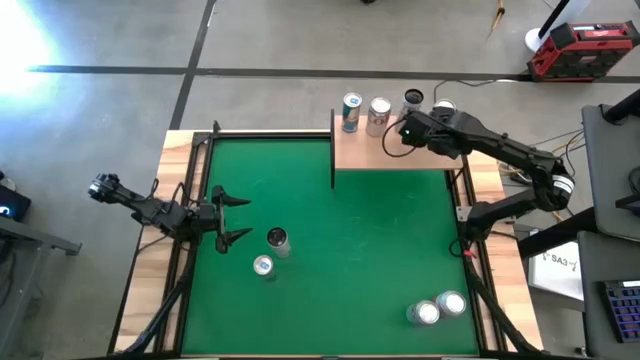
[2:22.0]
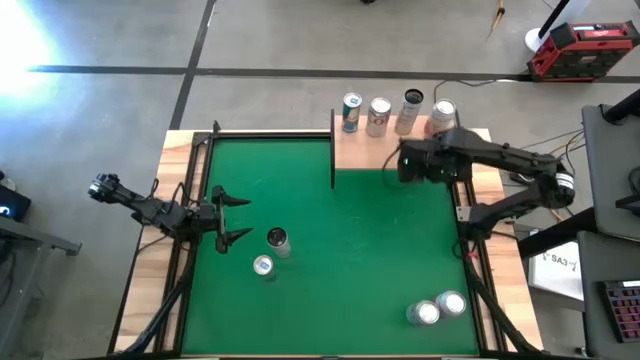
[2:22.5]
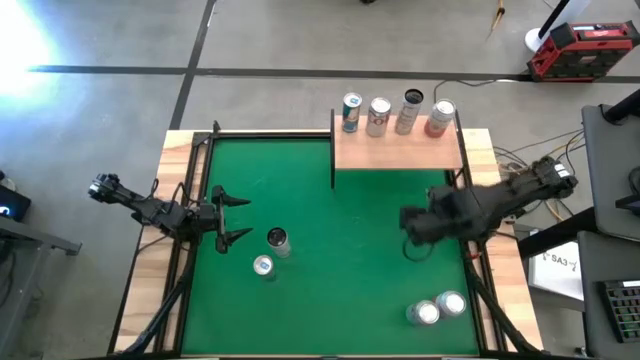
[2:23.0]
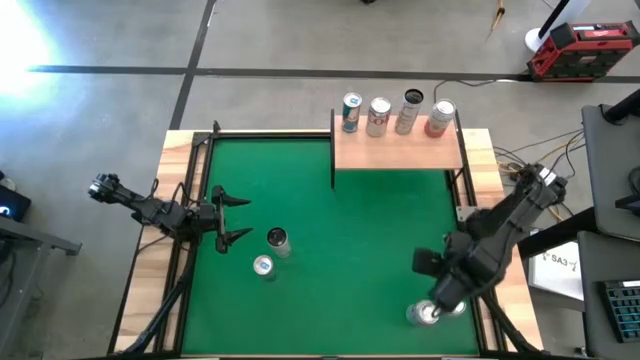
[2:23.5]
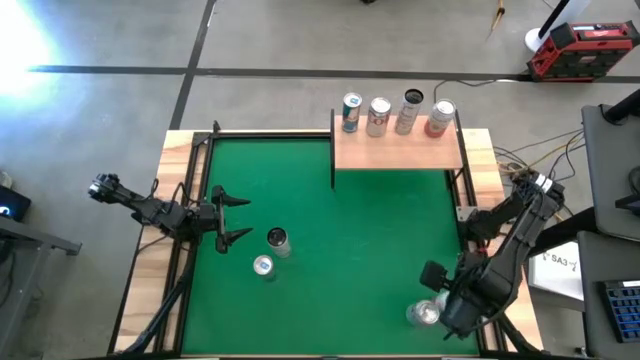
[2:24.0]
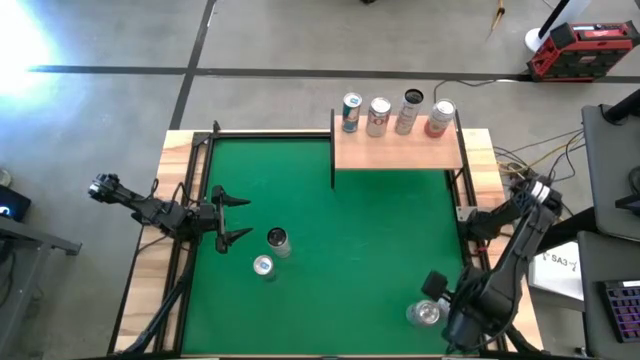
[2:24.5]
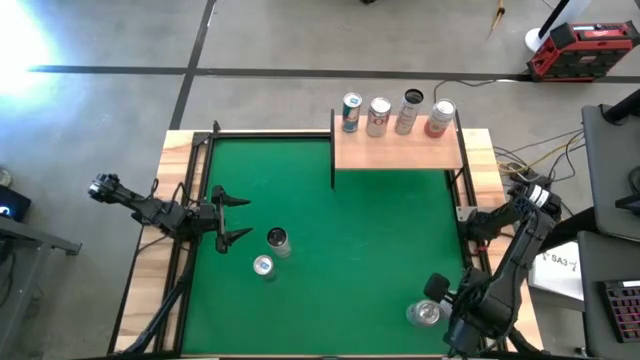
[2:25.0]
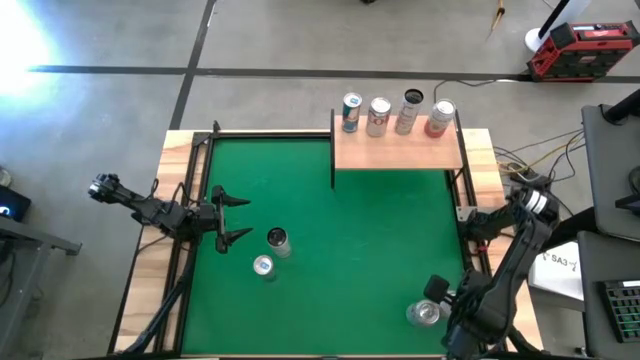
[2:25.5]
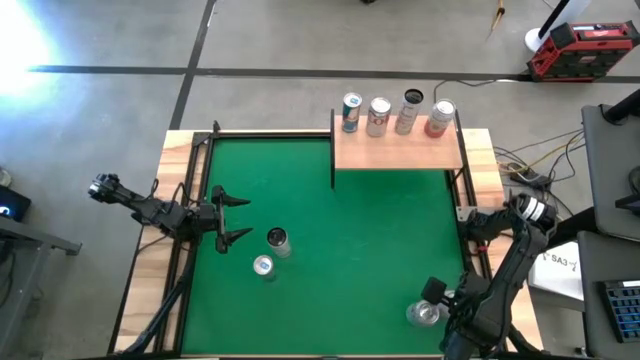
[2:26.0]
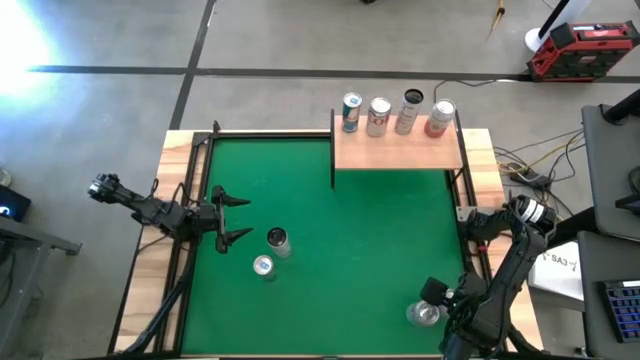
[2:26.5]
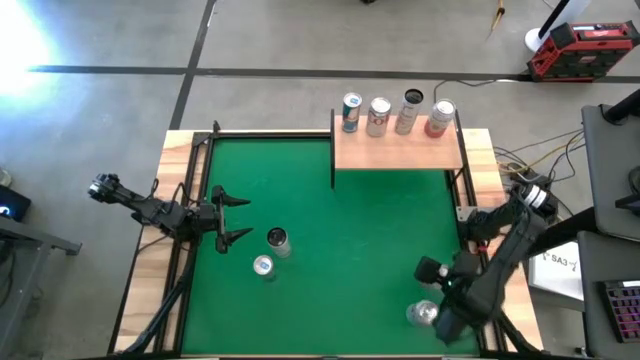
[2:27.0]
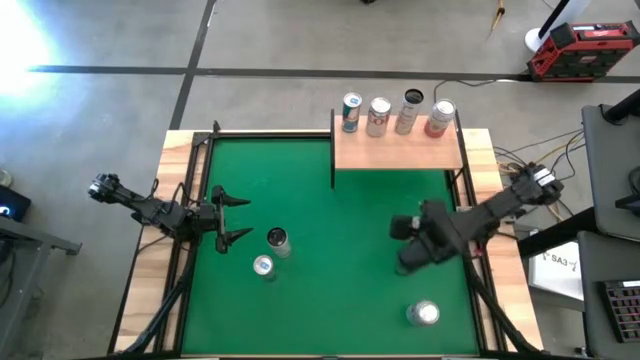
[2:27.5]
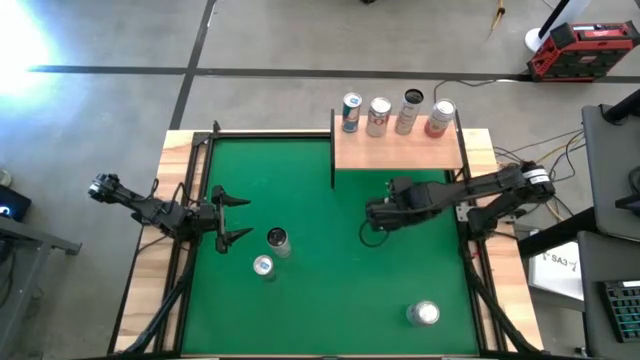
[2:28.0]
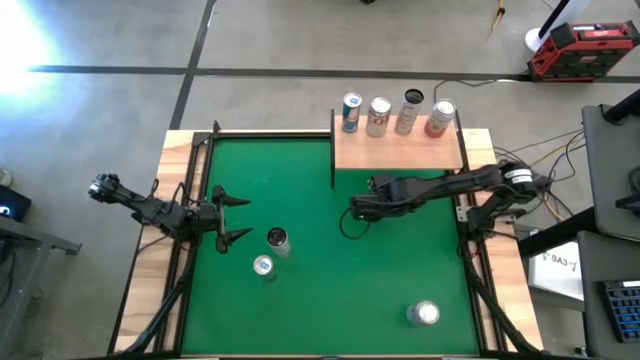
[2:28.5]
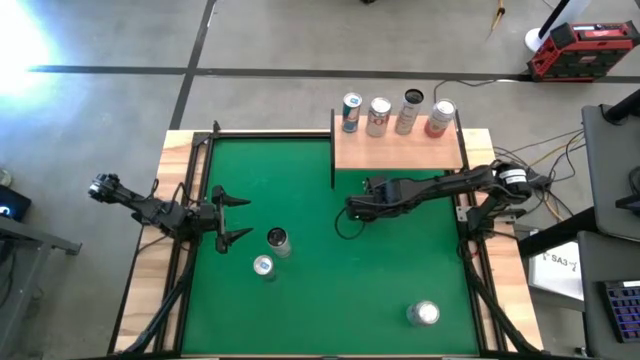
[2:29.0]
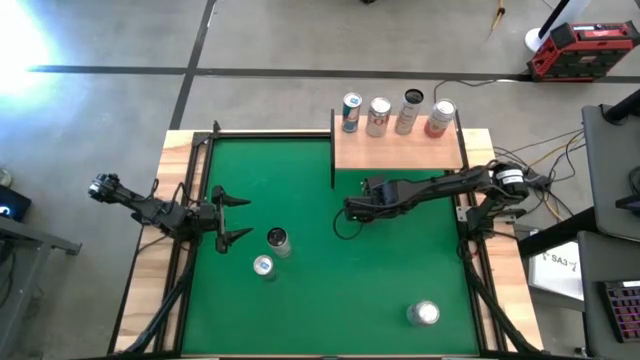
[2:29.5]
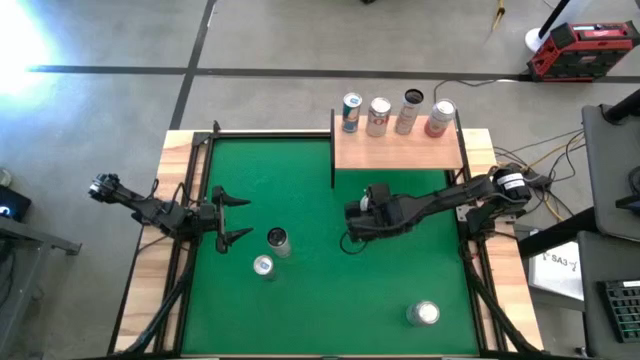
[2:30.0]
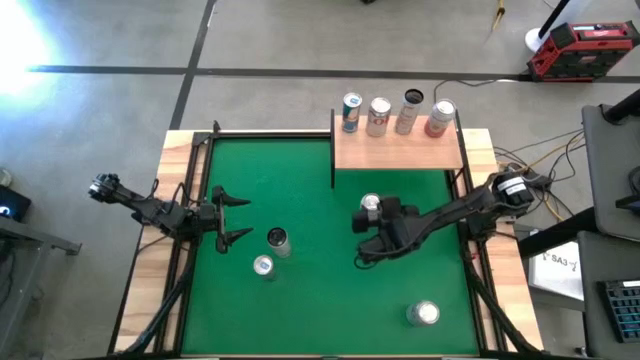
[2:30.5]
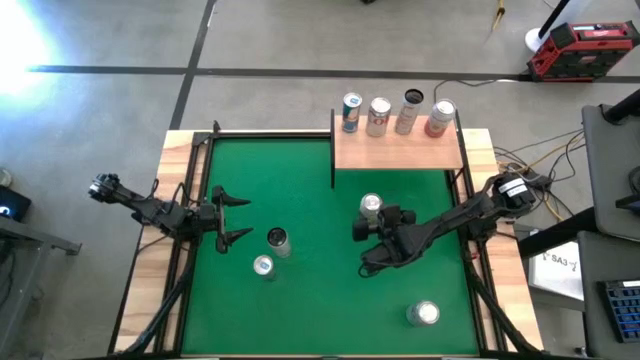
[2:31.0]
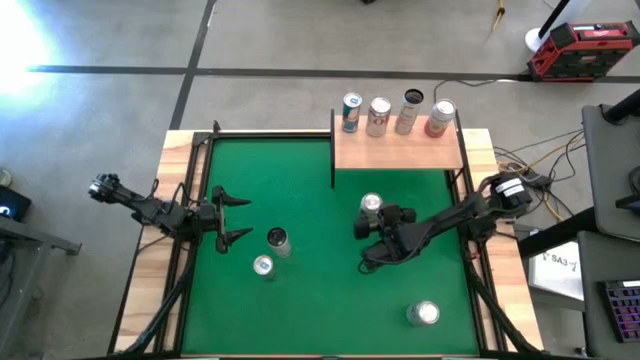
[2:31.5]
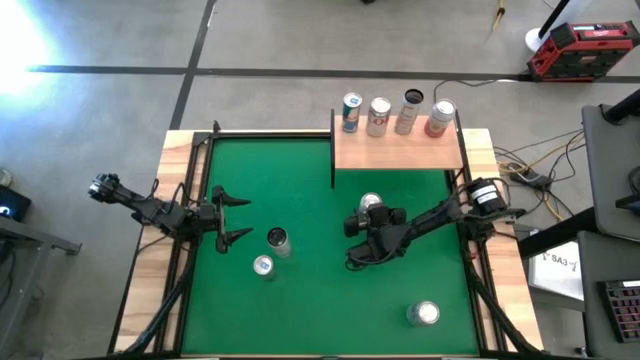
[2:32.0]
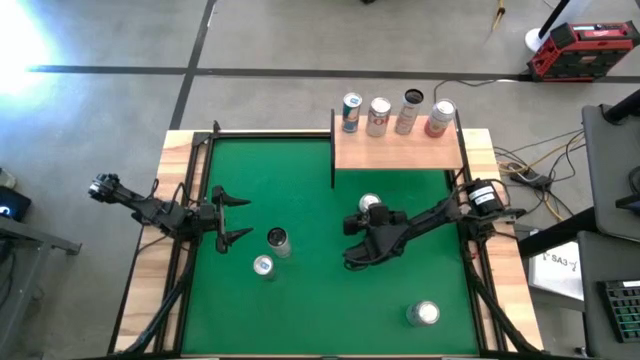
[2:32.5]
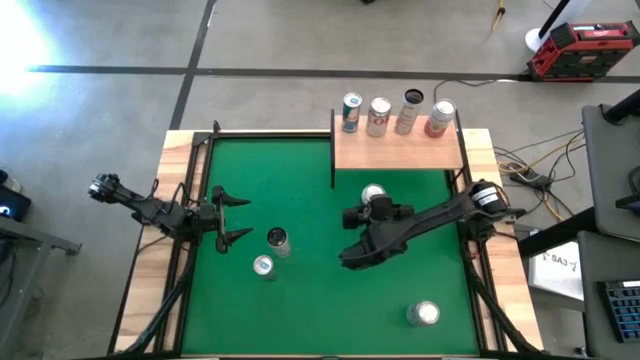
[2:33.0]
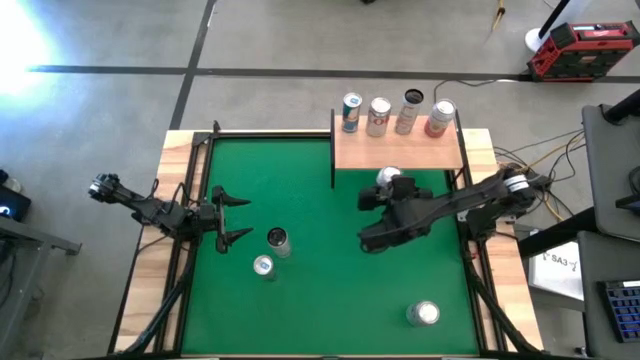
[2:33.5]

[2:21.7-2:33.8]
Task: Place canned beverage on shelf
Put the pink-white soda can on the shelf aligned with the other pink-white soda can

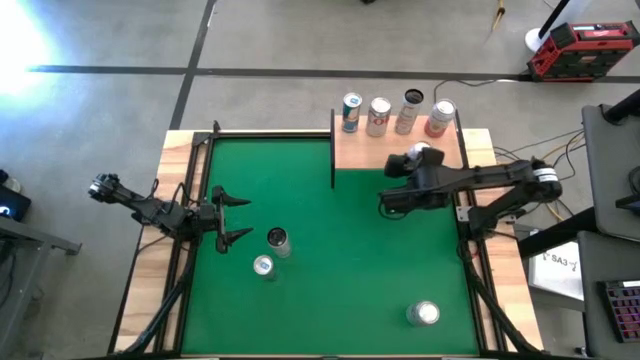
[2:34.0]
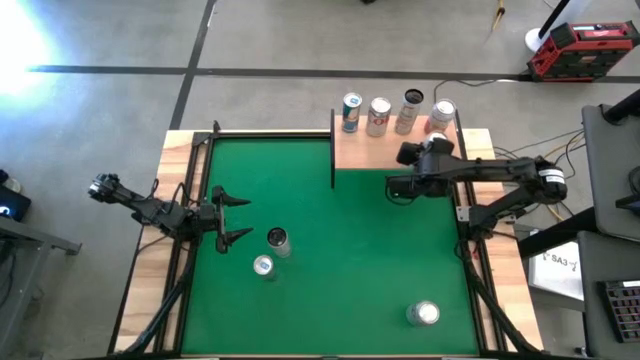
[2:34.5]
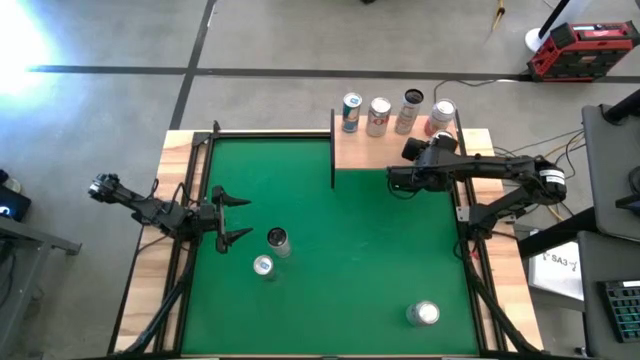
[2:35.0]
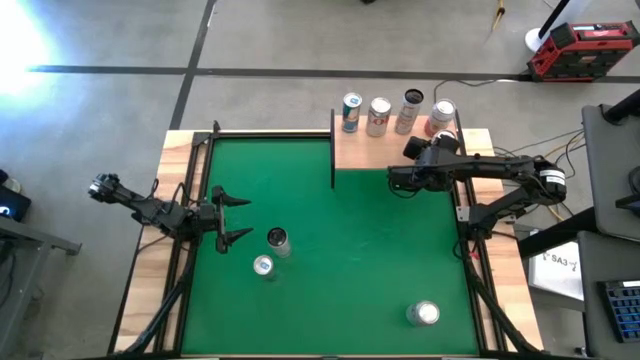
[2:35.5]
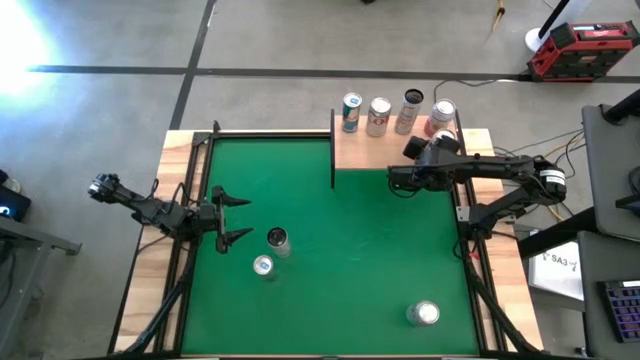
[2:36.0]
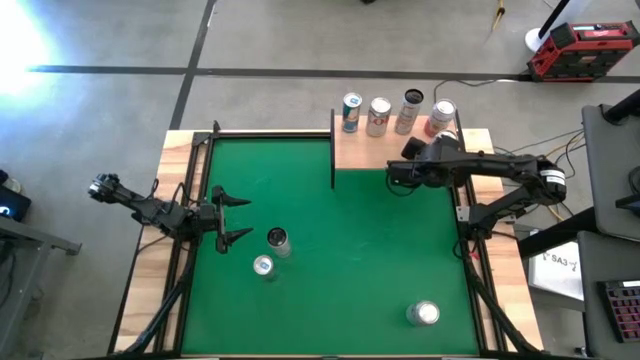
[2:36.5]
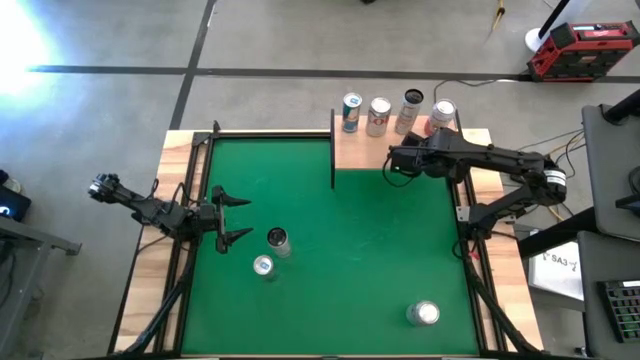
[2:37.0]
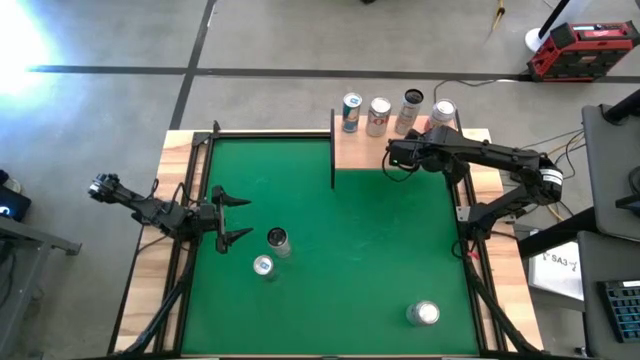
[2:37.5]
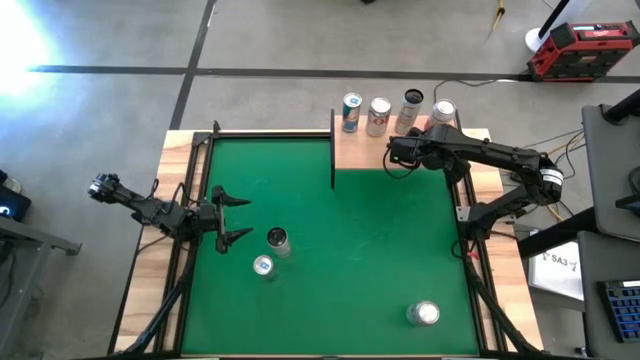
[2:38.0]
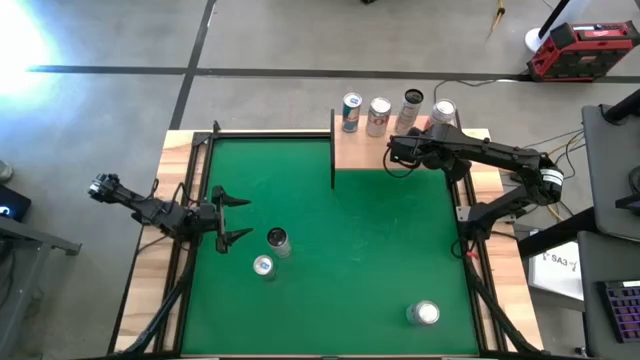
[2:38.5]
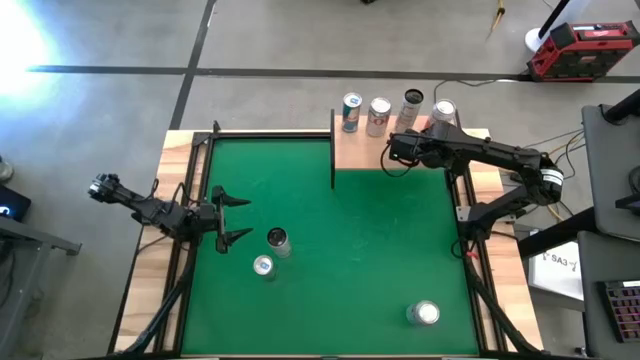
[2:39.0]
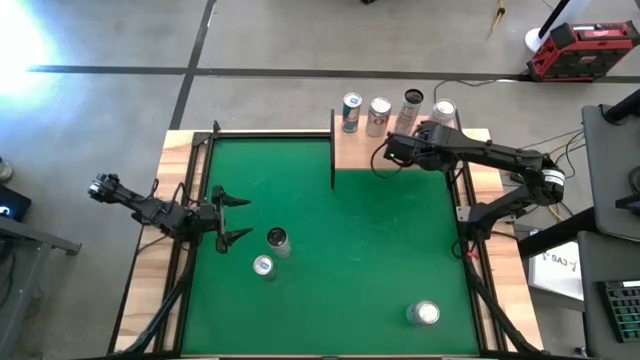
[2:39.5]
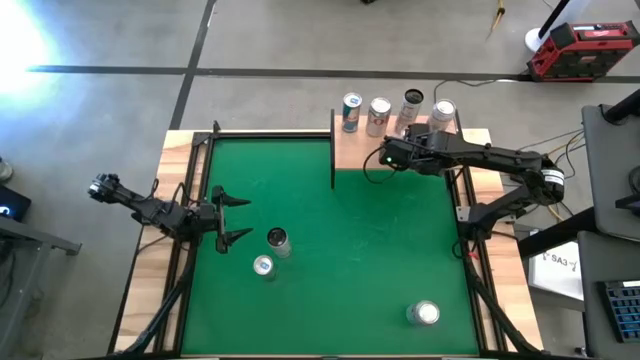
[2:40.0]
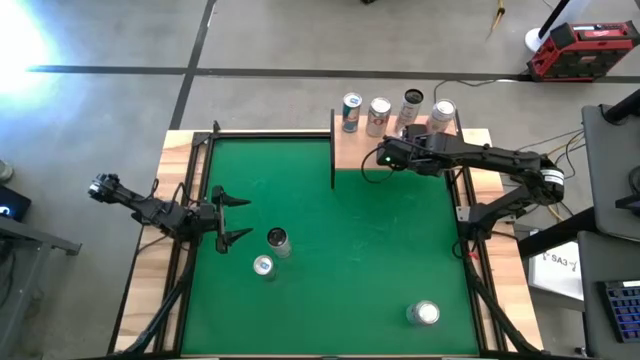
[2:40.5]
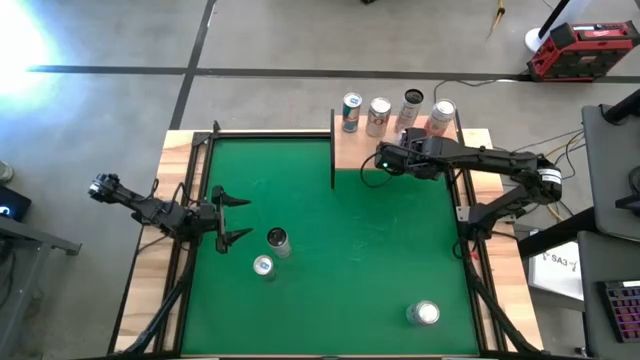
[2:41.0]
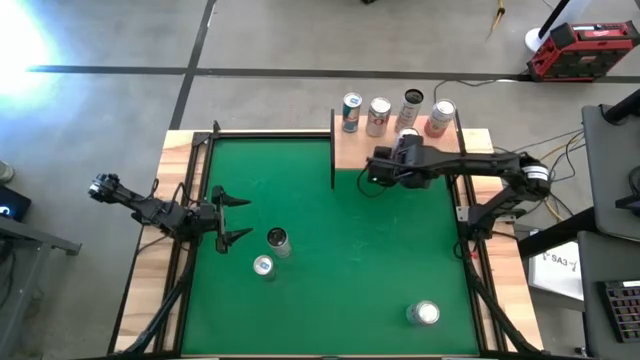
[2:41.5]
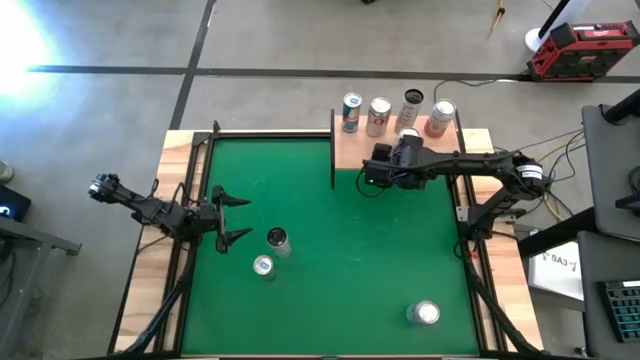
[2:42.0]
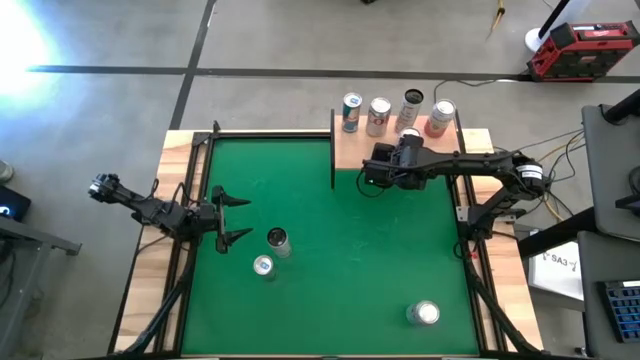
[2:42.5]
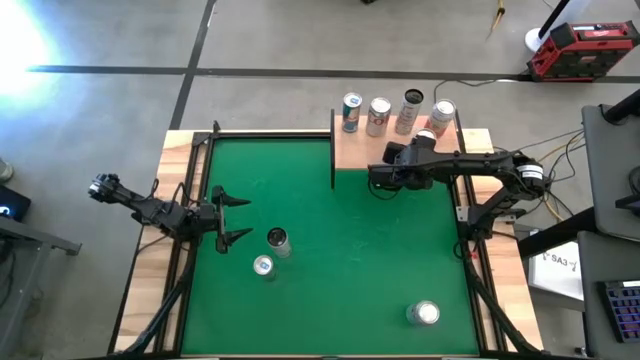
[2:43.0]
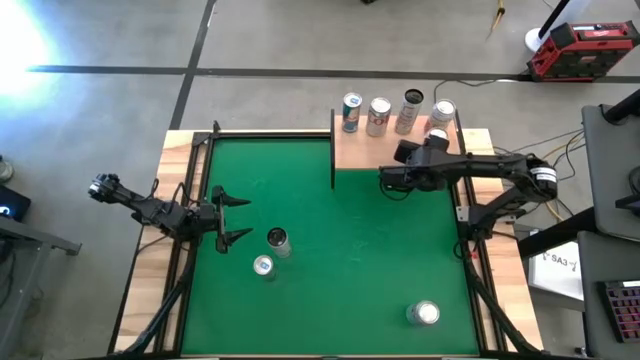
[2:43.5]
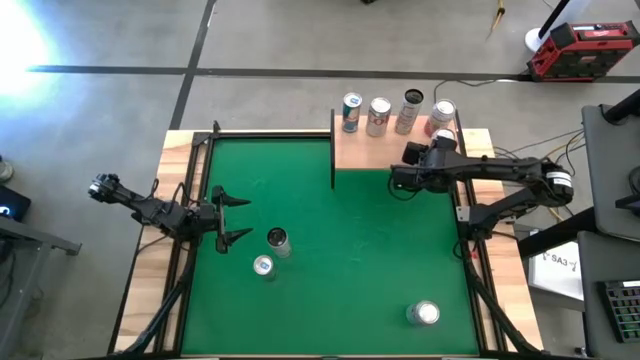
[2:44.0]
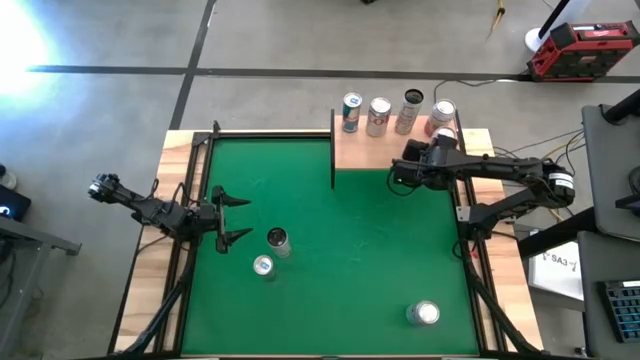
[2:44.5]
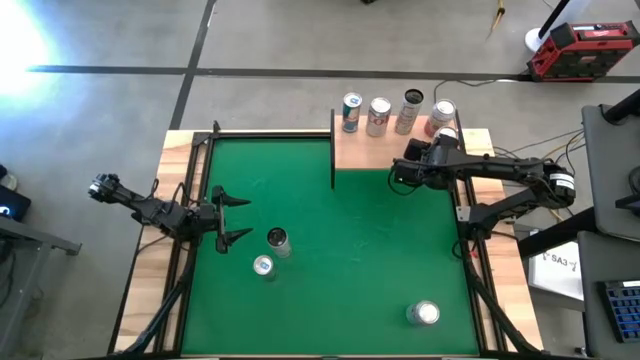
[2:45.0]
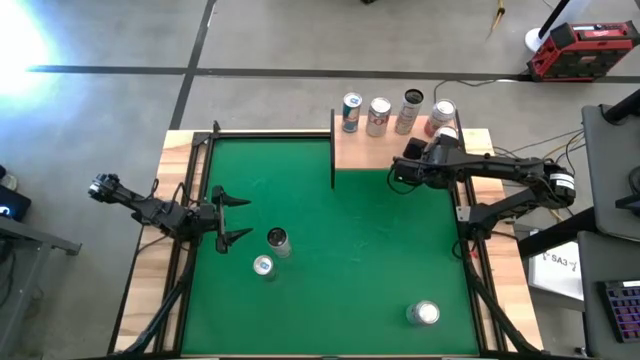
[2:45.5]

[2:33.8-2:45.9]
Put the pink-white soda can on the shelf aligned with the other pink-white soda can
